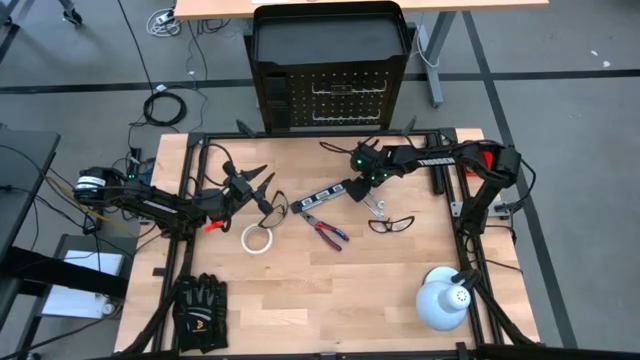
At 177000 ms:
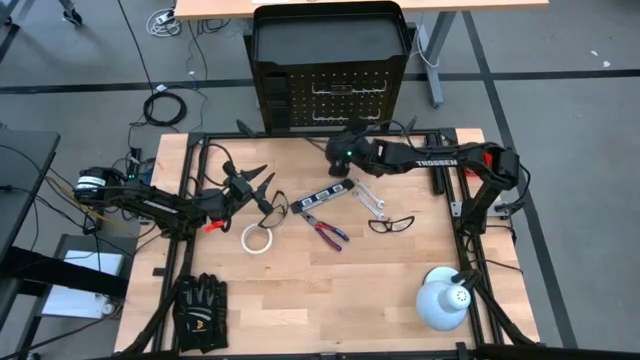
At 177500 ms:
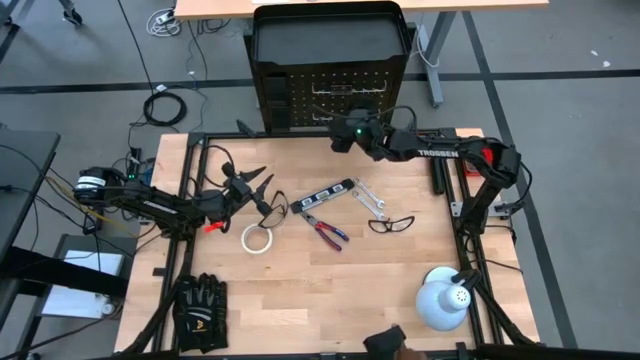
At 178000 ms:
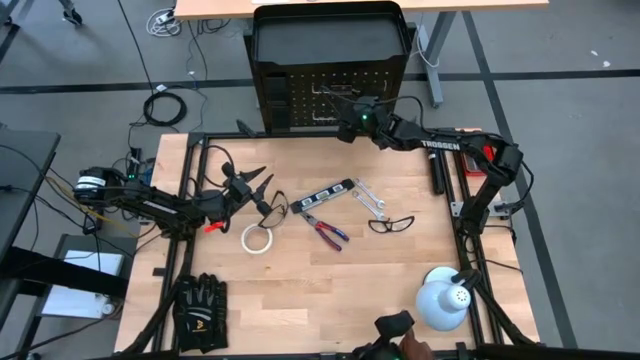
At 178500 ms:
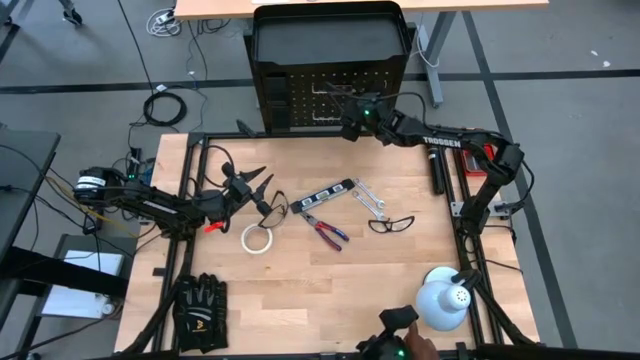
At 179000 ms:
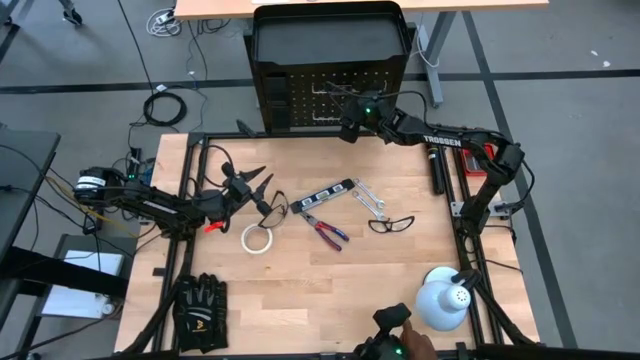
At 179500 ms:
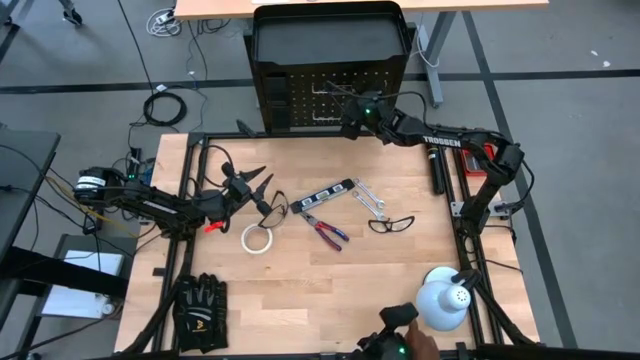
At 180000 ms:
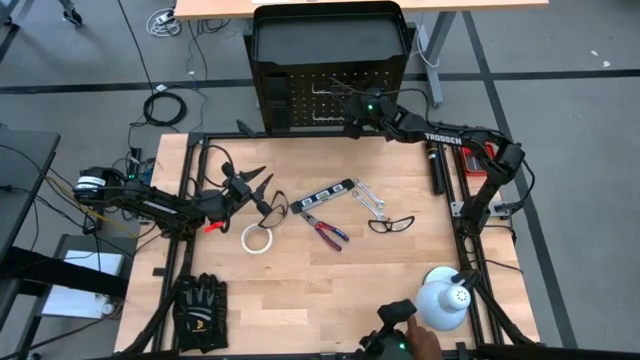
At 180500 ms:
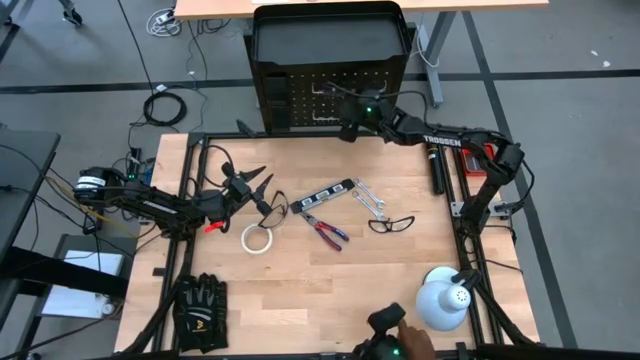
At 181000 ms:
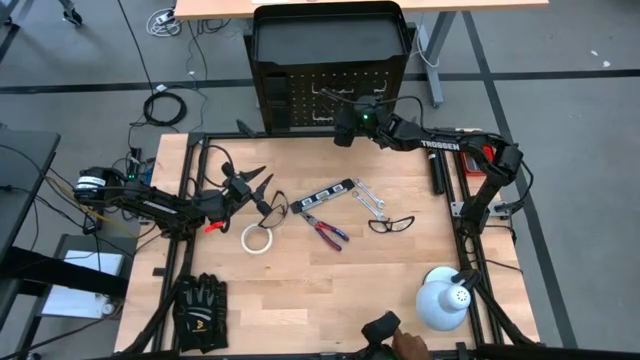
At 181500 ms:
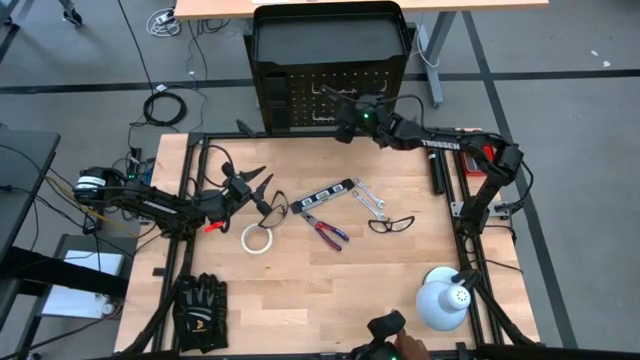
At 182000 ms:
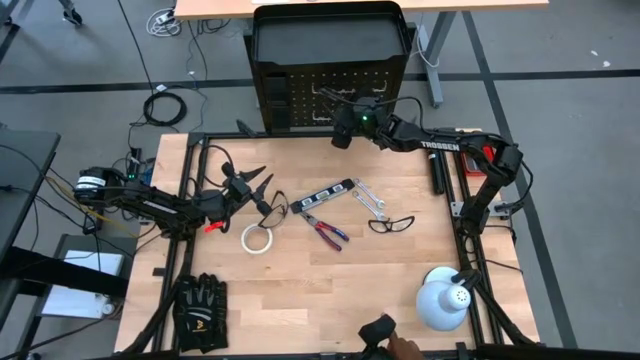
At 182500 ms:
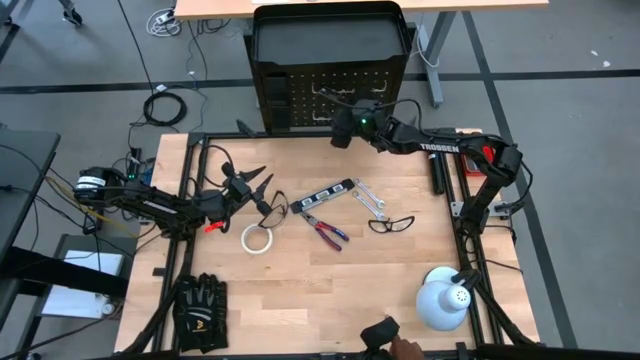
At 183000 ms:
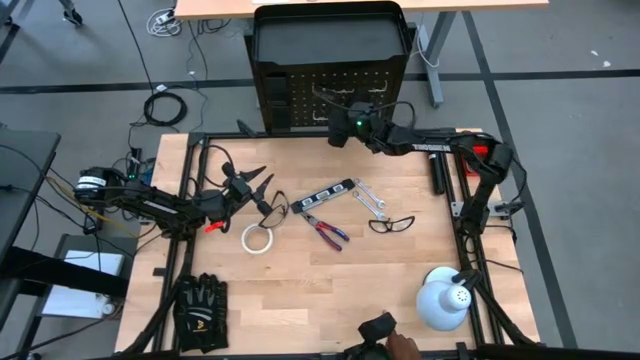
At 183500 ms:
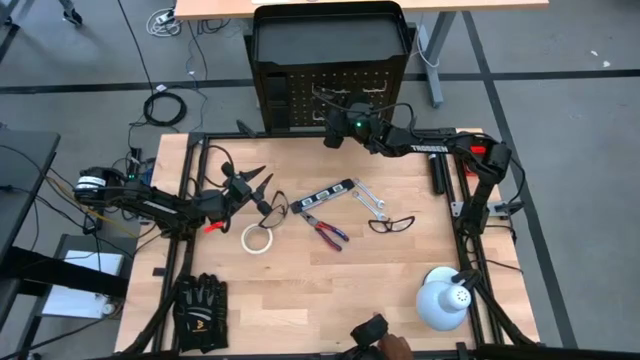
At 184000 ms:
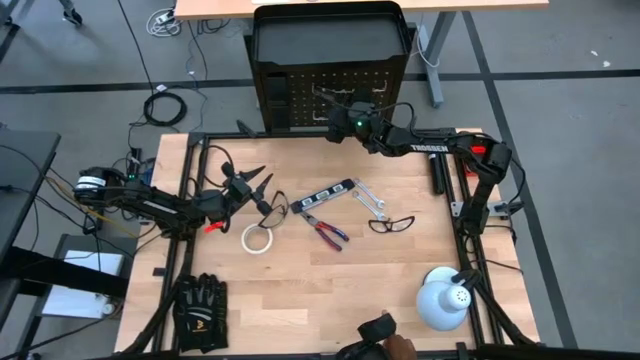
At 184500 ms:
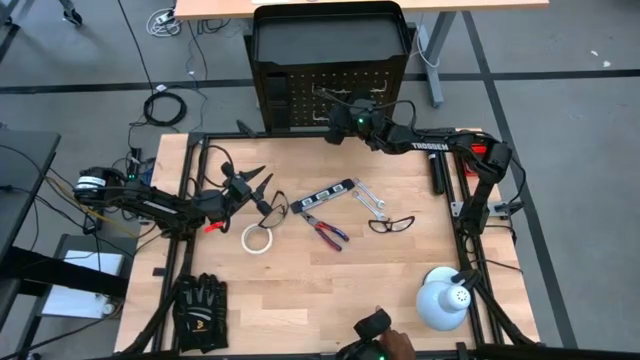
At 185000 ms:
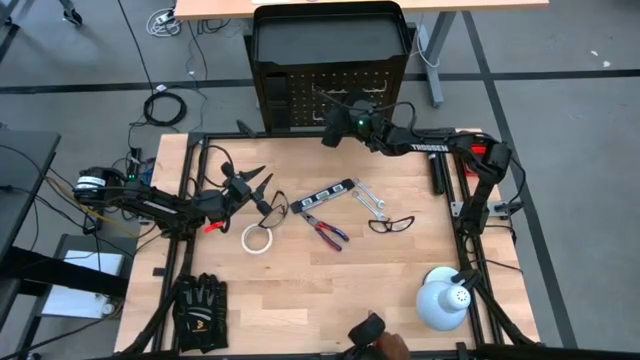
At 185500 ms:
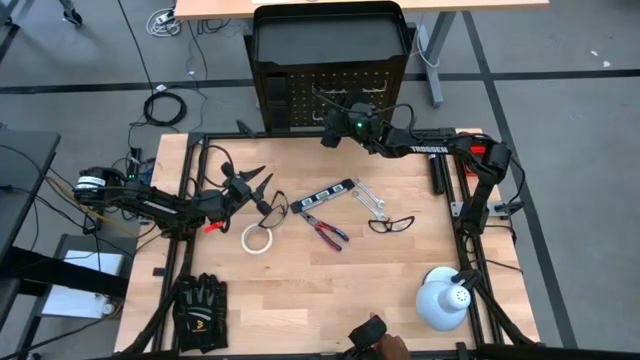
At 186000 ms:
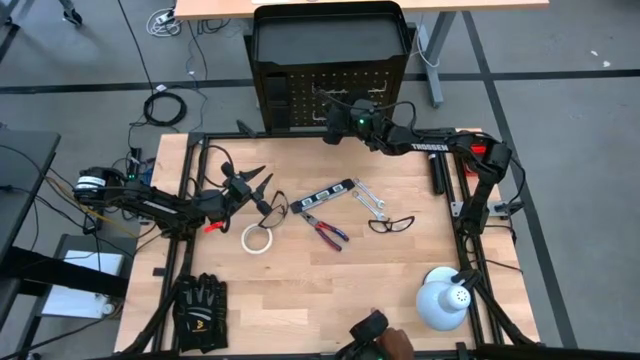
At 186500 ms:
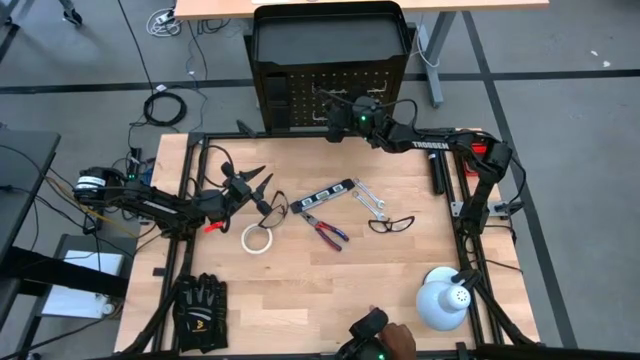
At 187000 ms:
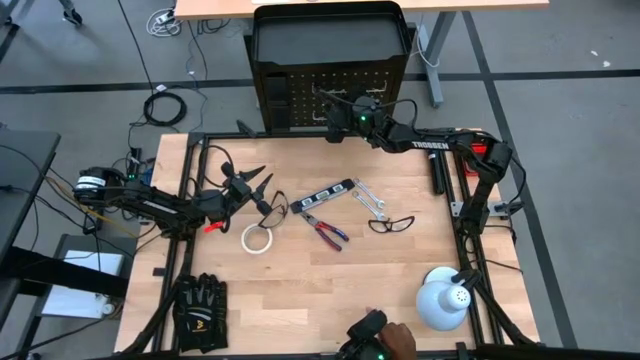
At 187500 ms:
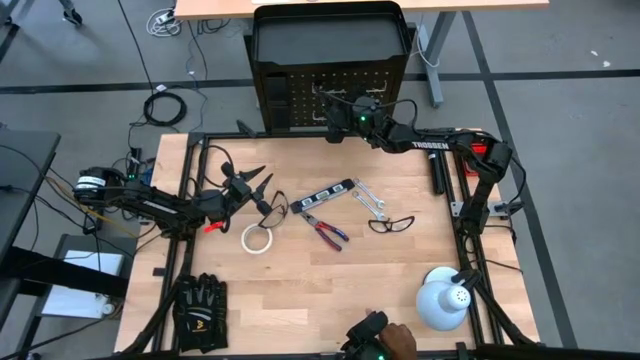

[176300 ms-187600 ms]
Task: Hang tools onto peg board
Unhang the utility knife blades from the peg board

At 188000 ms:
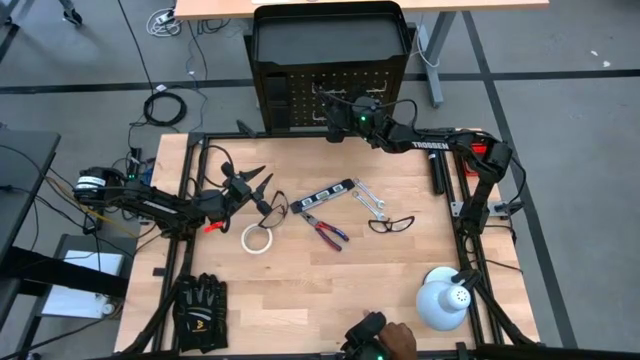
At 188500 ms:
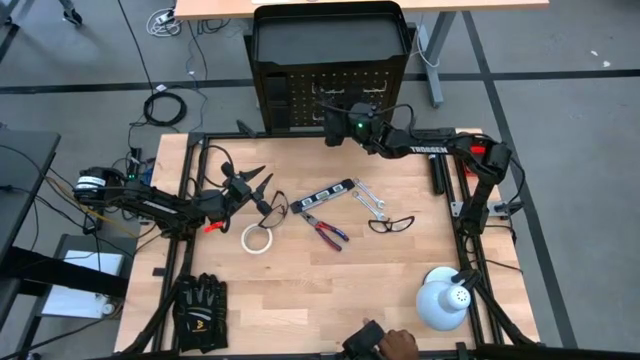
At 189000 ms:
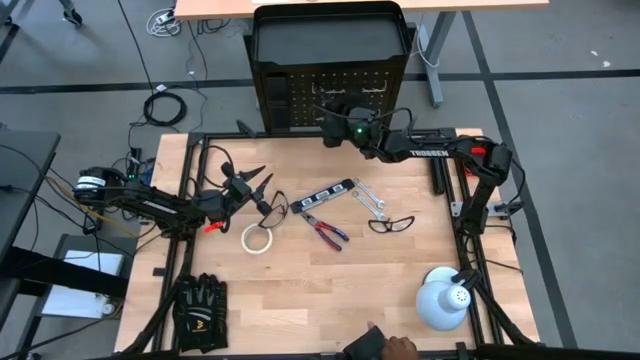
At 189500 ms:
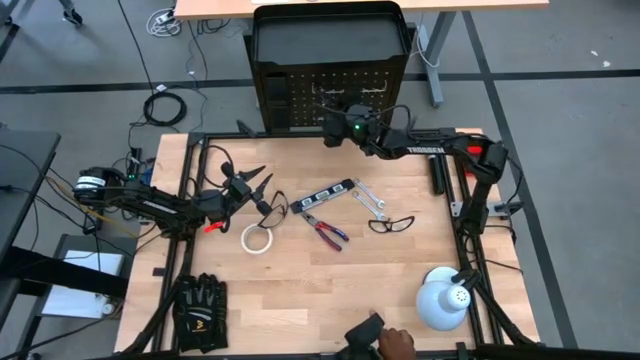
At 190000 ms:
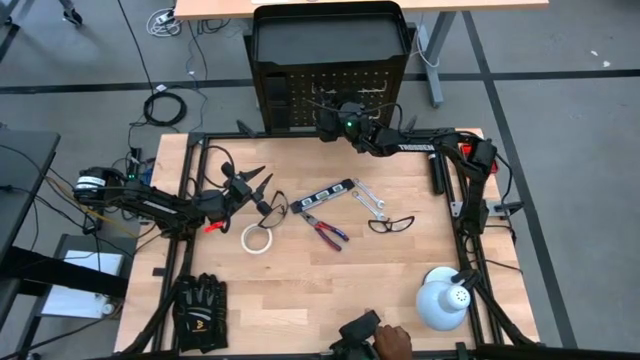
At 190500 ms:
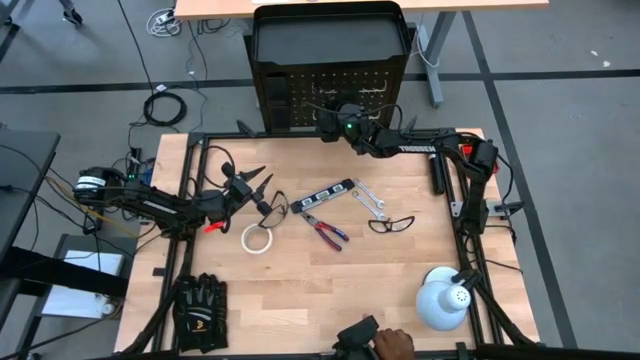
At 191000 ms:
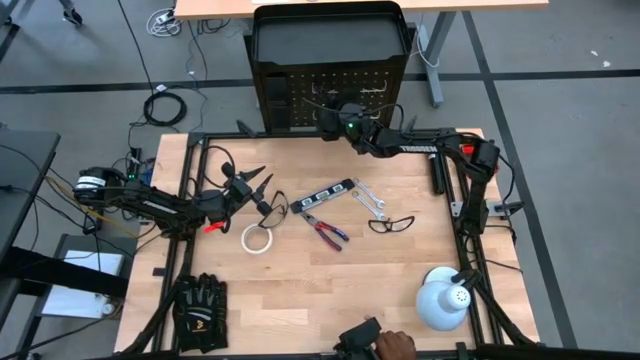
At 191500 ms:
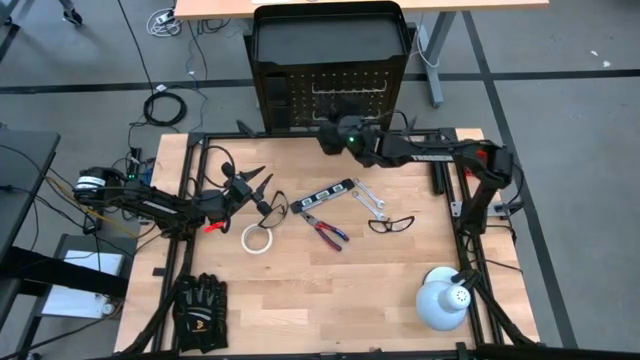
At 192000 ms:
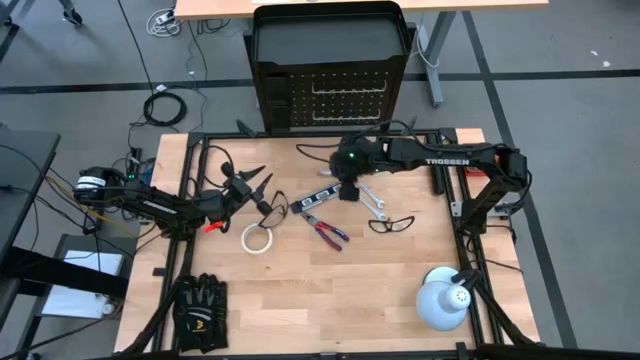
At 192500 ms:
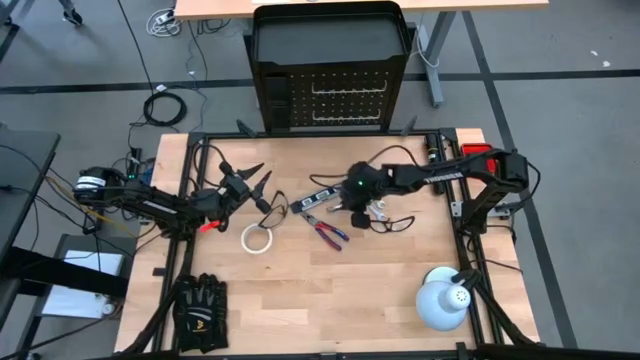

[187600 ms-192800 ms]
Unhang the utility knife blades from the peg board

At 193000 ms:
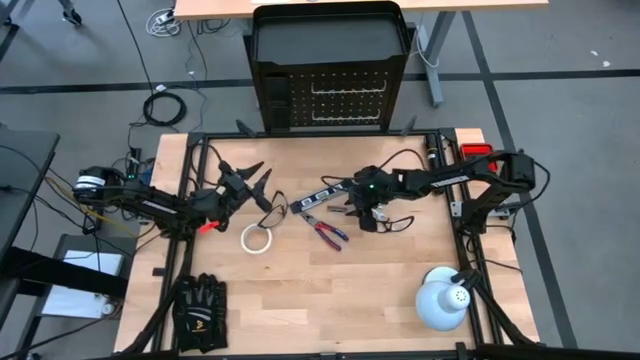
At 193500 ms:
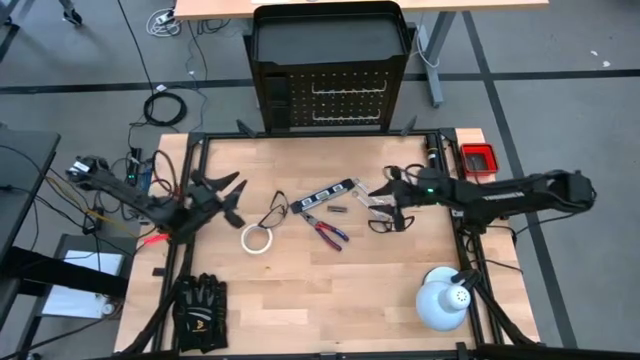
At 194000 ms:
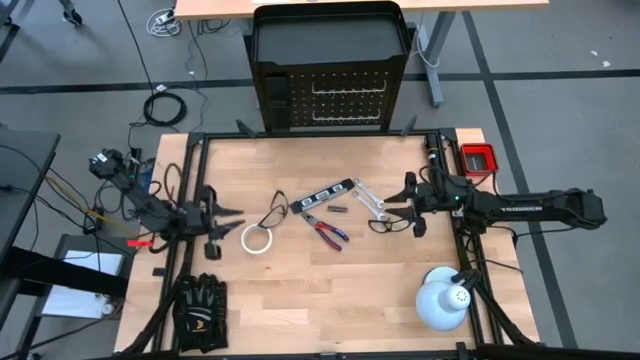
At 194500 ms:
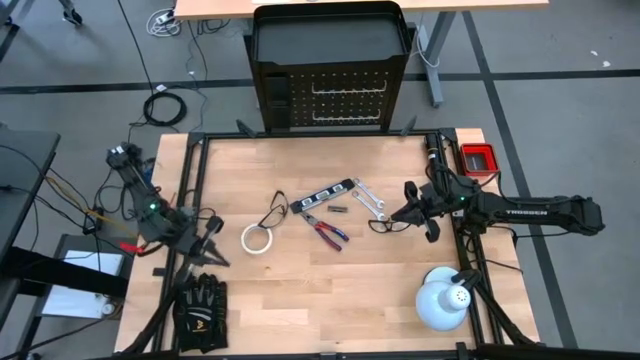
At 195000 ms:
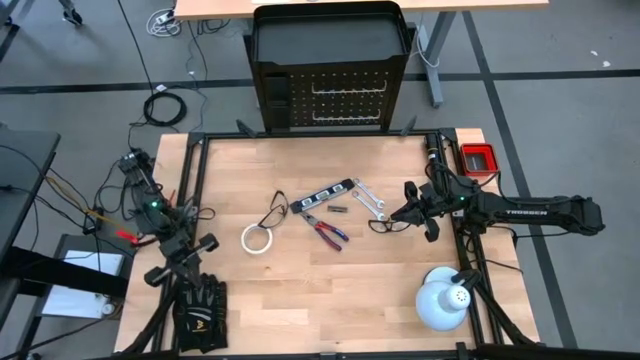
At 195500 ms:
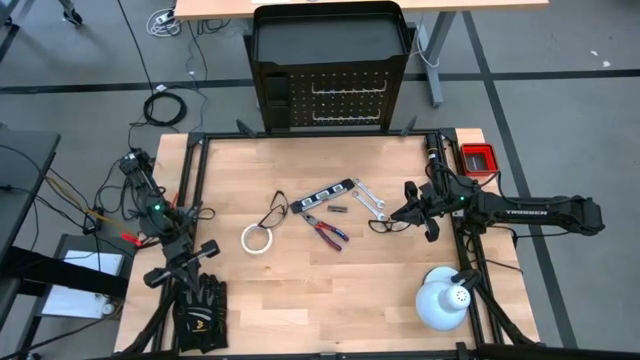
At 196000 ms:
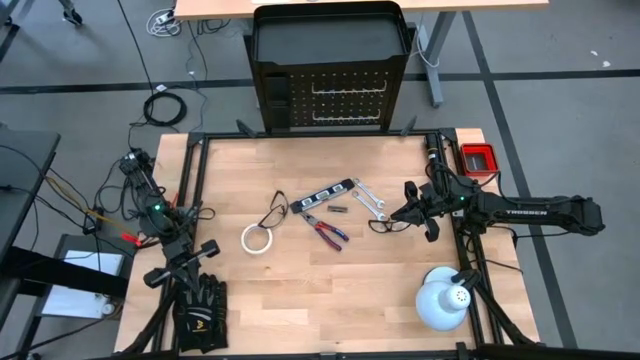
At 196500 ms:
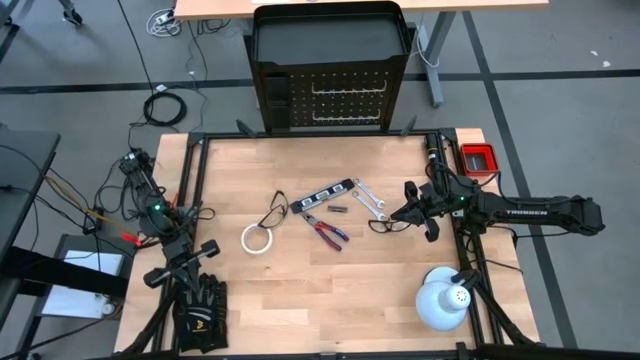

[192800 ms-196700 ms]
Return to Home Position
